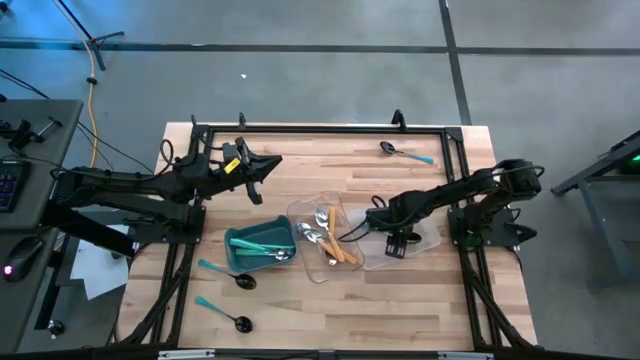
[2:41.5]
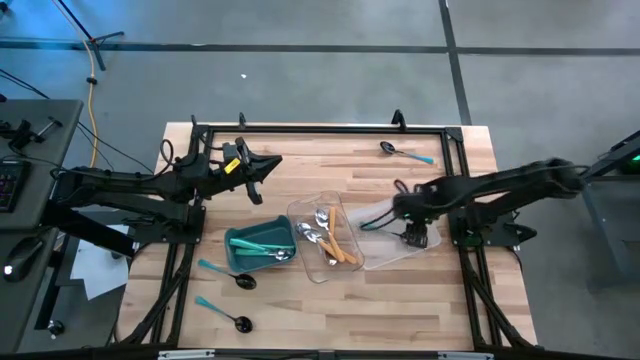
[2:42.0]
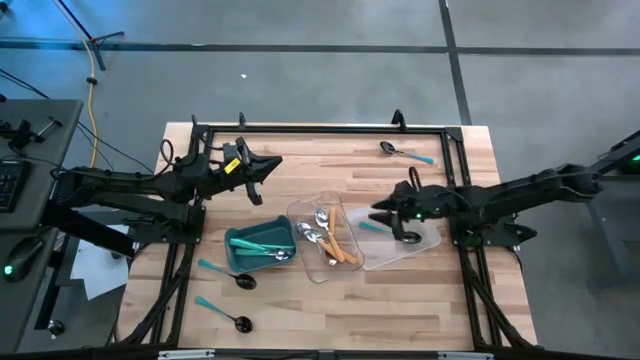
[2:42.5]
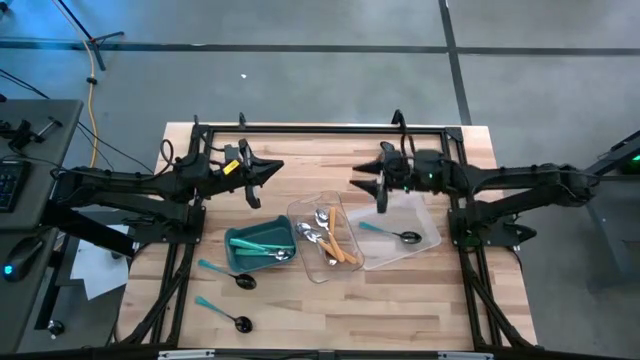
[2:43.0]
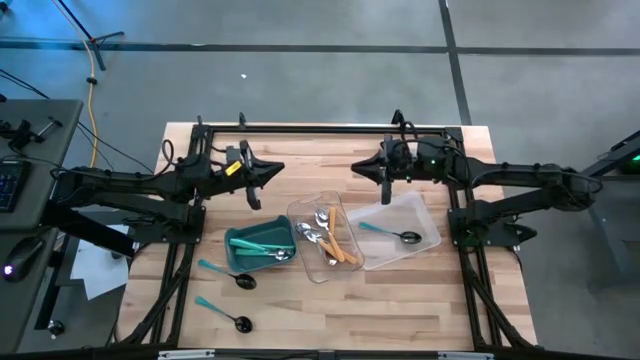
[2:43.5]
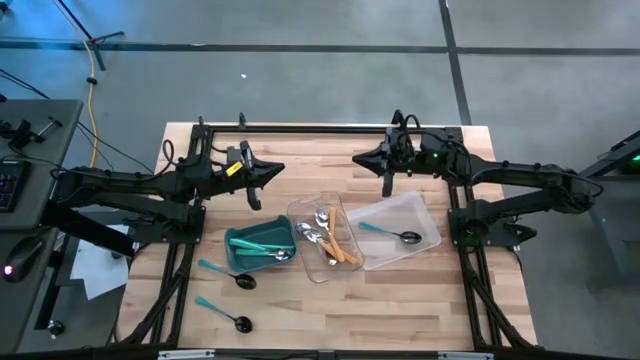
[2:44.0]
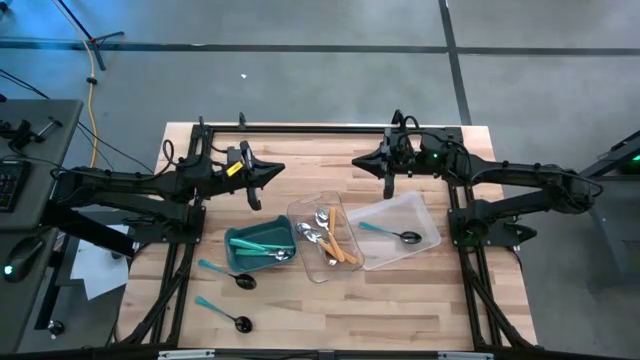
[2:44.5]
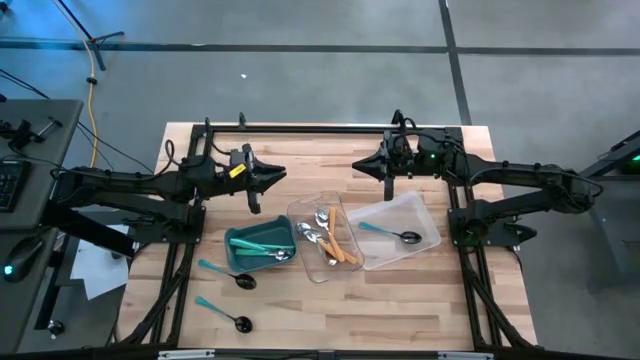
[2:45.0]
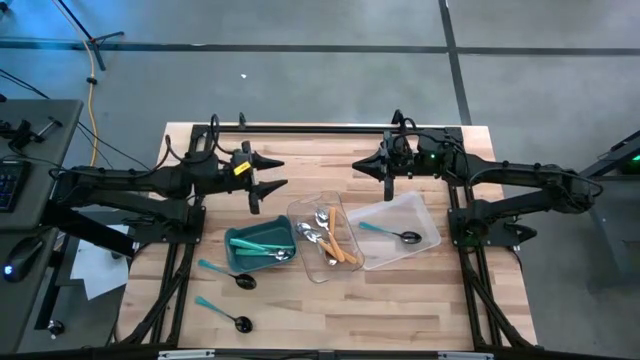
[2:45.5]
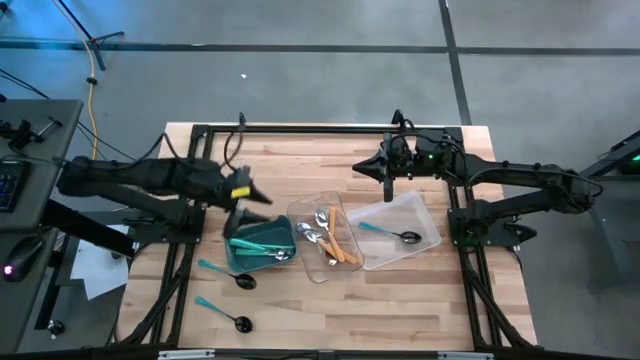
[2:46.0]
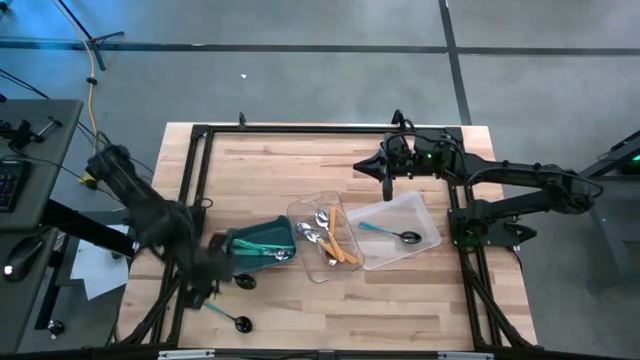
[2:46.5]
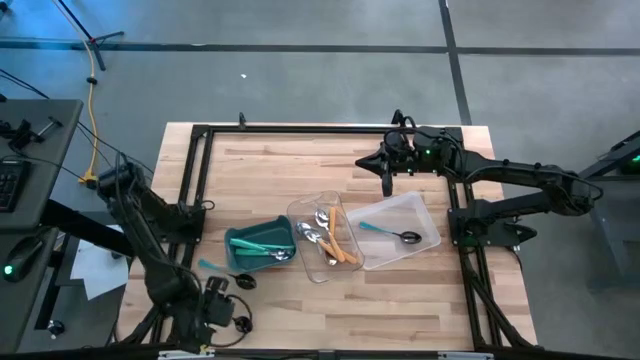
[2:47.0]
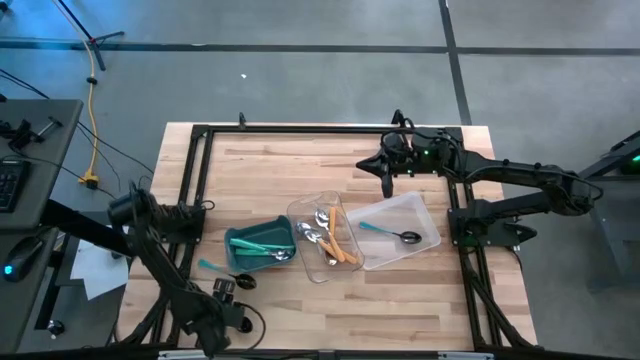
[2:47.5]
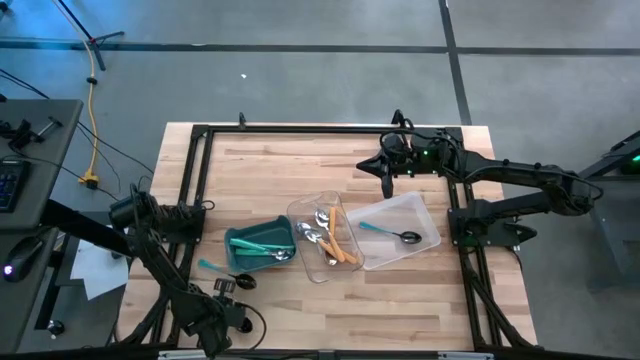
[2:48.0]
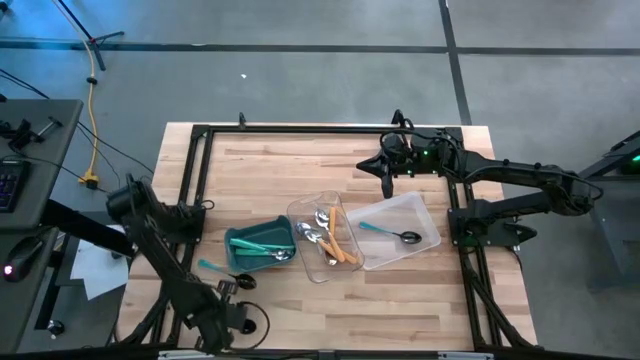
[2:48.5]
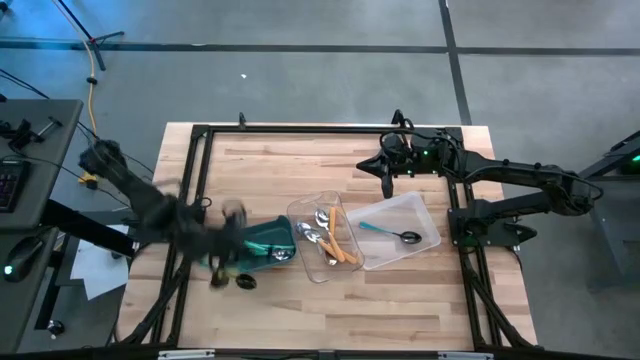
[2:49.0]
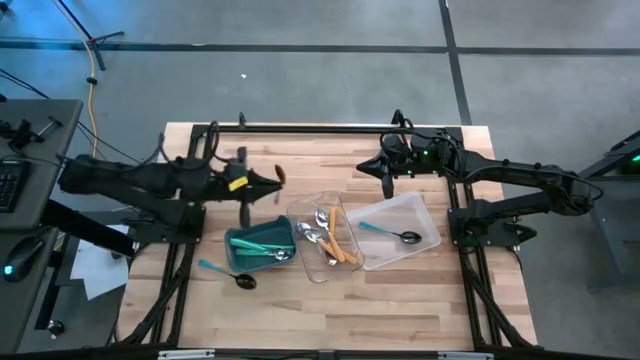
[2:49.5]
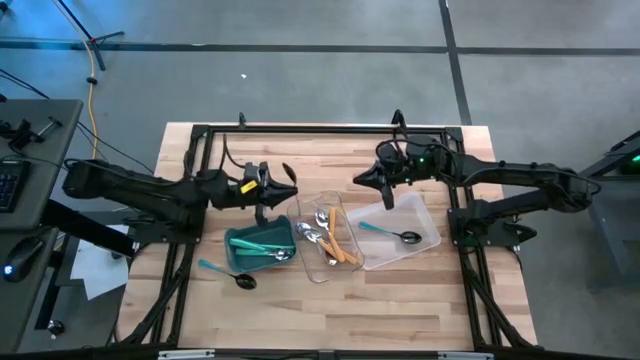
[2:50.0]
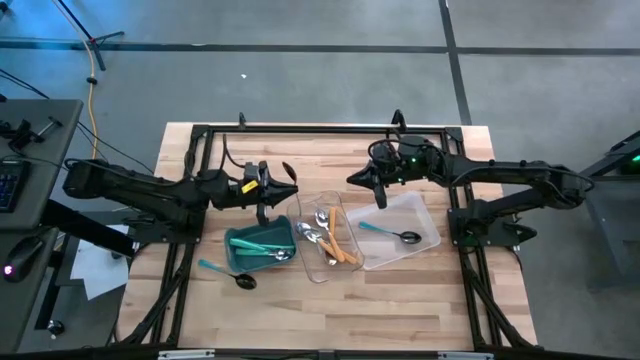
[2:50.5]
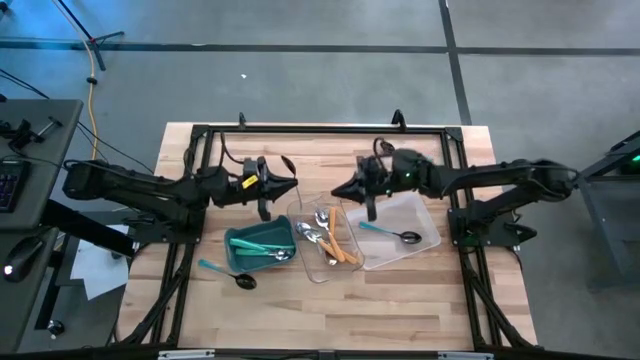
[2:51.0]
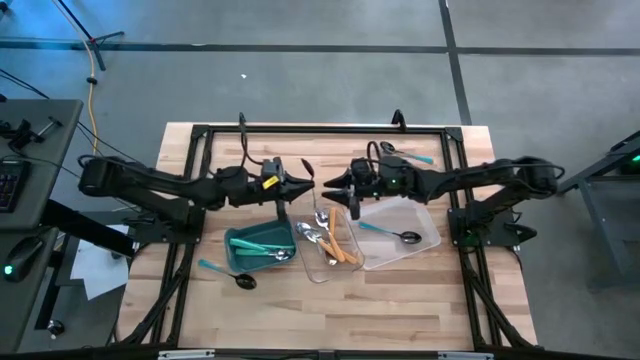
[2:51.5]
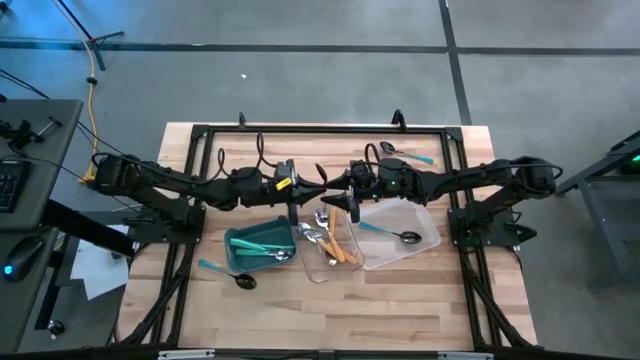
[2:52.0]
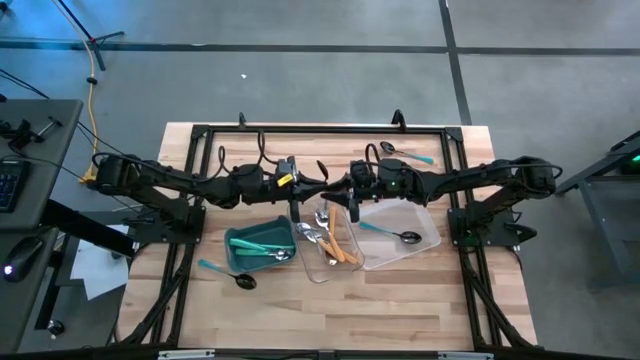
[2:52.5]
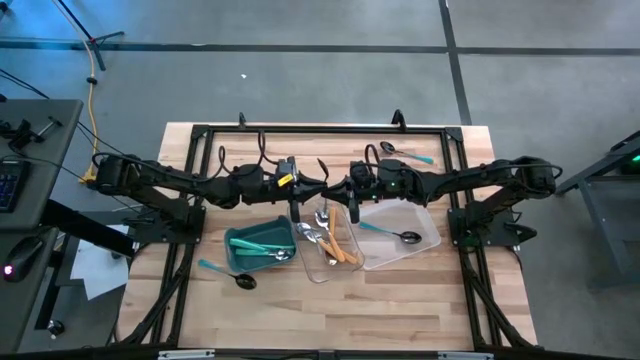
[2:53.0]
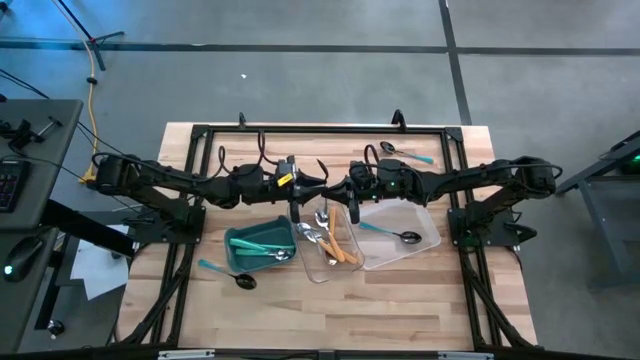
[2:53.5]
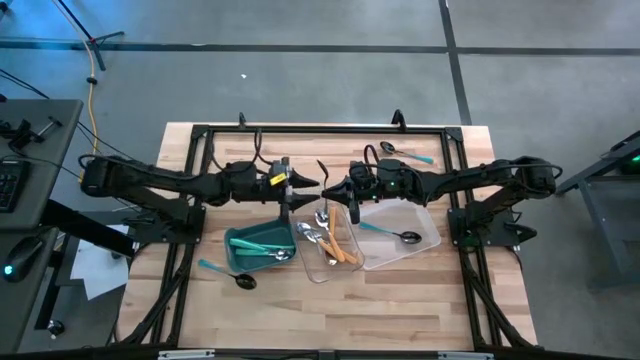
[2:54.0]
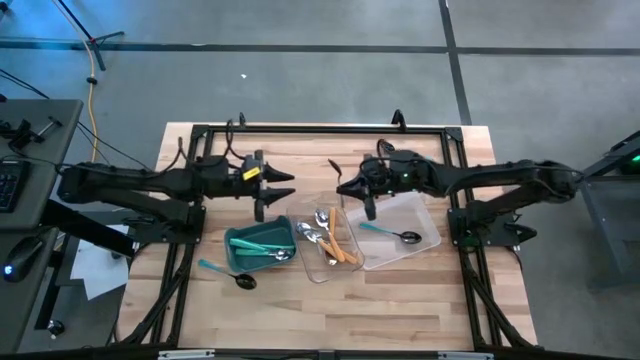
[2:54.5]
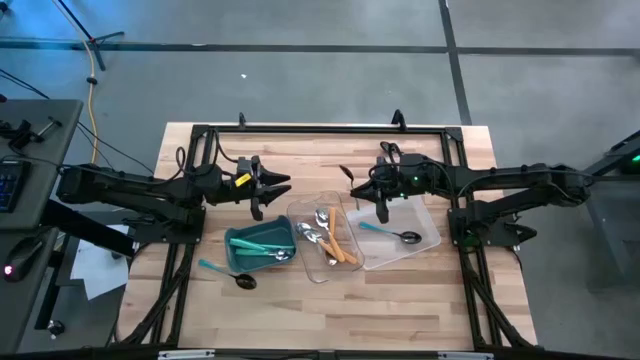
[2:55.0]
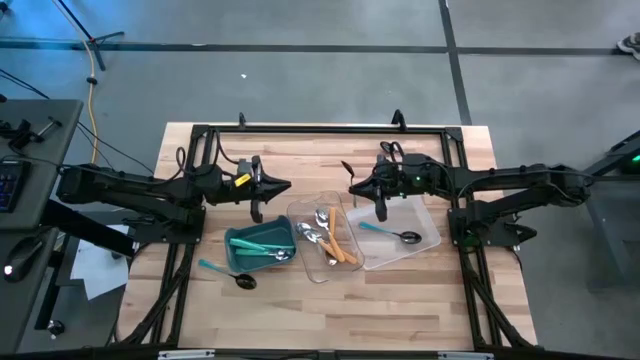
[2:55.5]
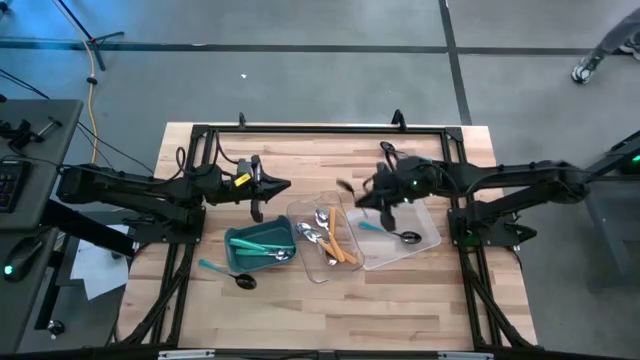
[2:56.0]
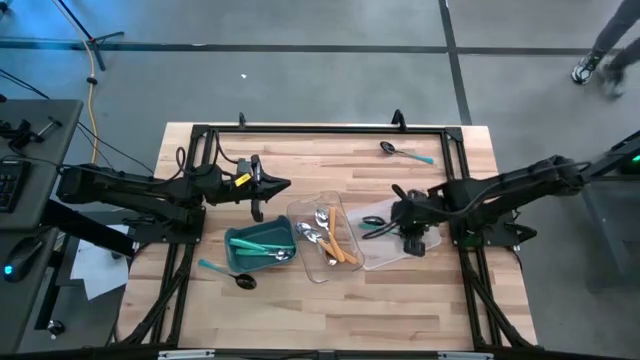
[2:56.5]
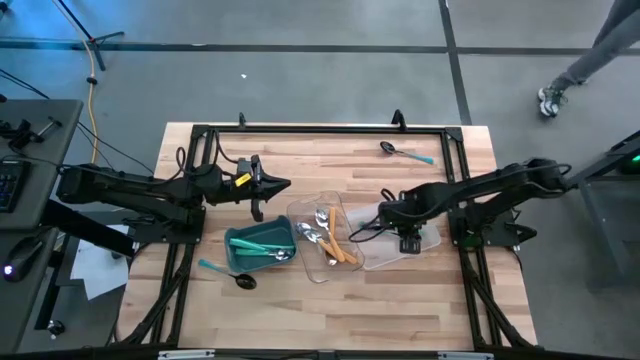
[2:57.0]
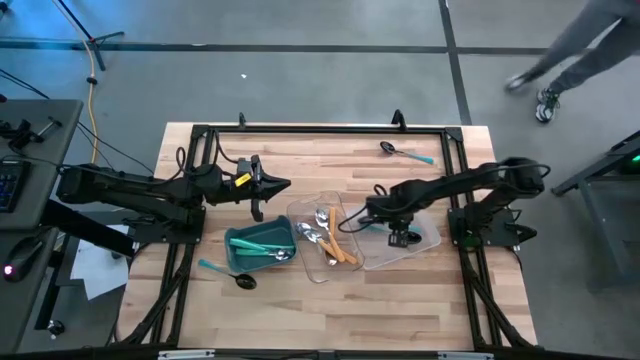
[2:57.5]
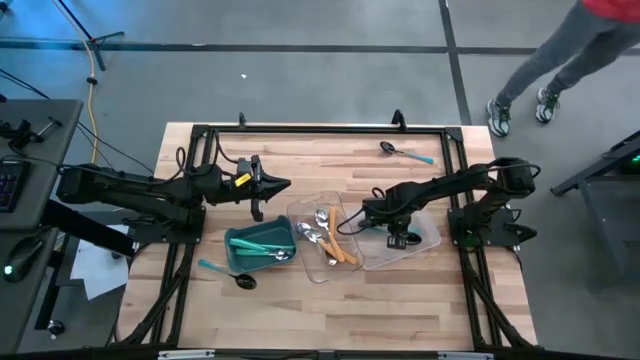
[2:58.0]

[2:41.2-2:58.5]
Task: Sort silverware by color (type)
Put the blue spoon into the white bin

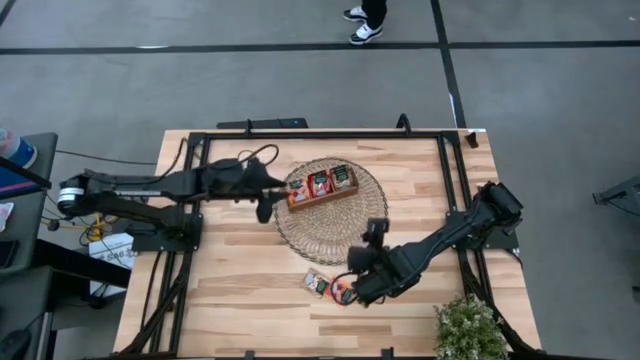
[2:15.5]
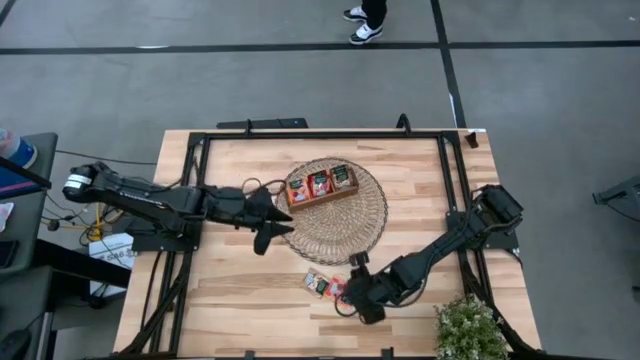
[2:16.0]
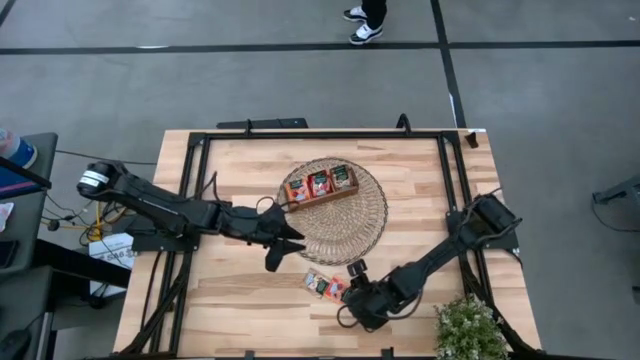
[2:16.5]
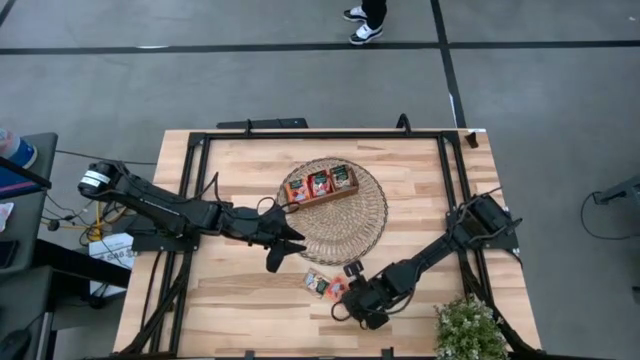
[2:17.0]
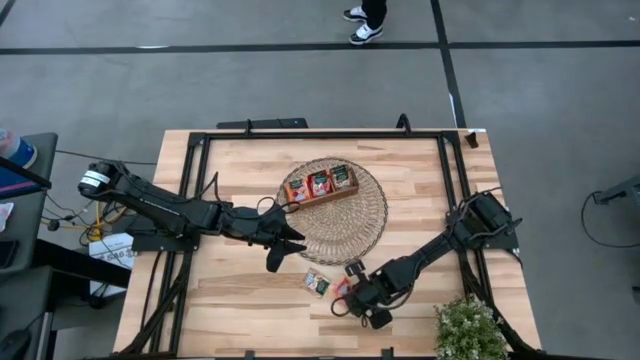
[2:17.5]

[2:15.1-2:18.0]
Task: Pick & Place Tea
Put the orange tea bag into the left side of the wooden organizer
